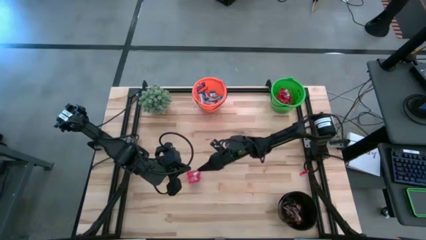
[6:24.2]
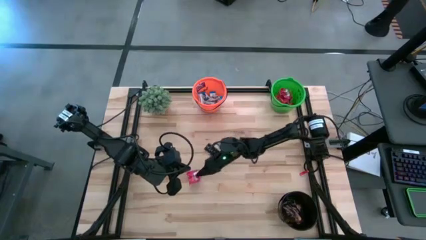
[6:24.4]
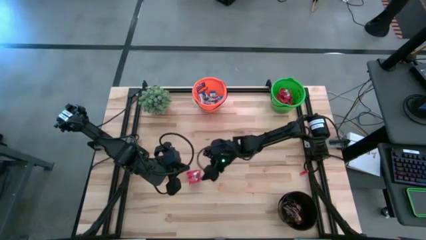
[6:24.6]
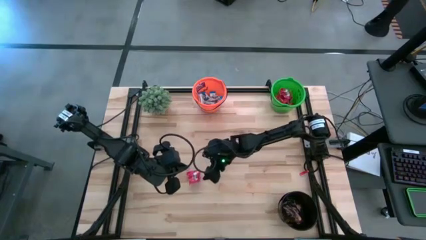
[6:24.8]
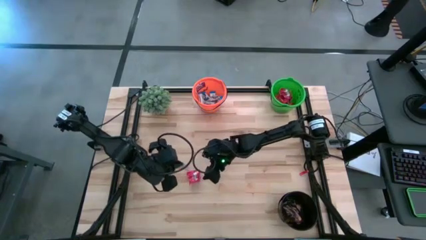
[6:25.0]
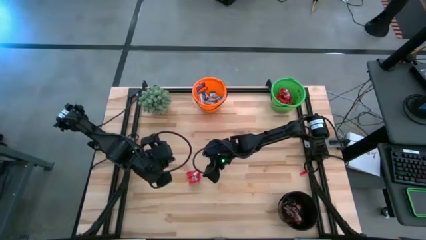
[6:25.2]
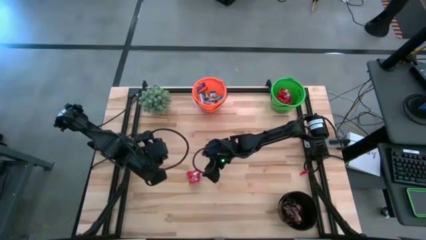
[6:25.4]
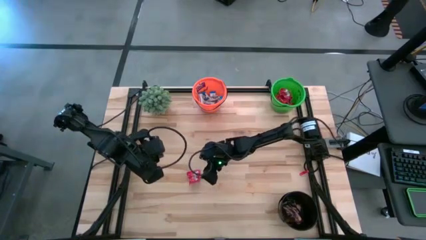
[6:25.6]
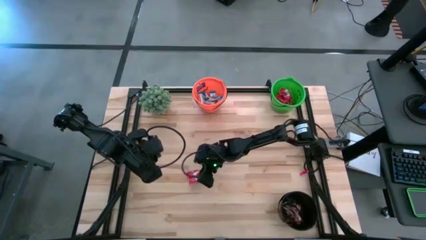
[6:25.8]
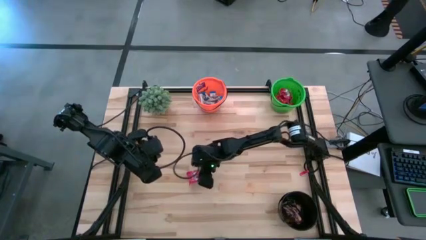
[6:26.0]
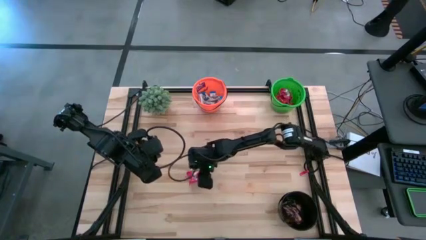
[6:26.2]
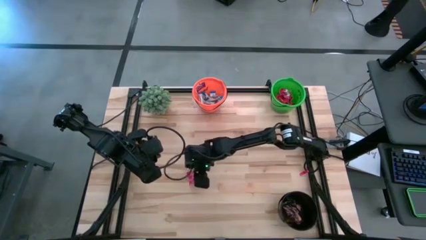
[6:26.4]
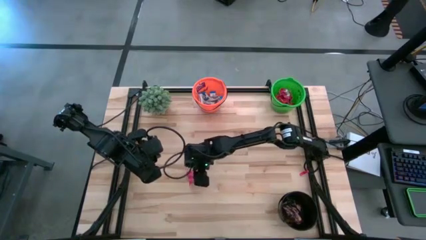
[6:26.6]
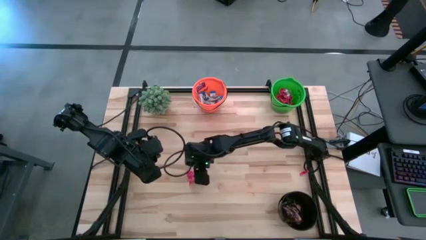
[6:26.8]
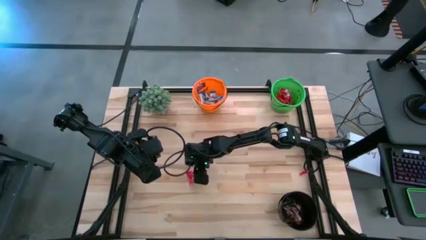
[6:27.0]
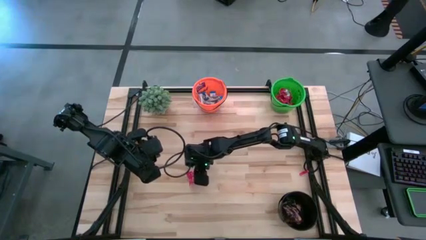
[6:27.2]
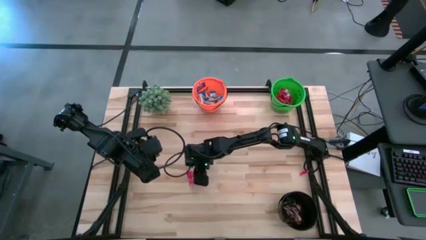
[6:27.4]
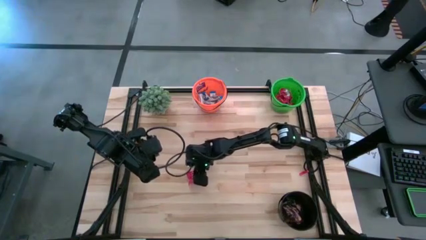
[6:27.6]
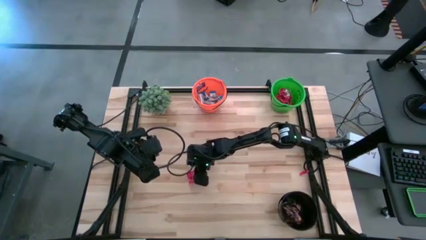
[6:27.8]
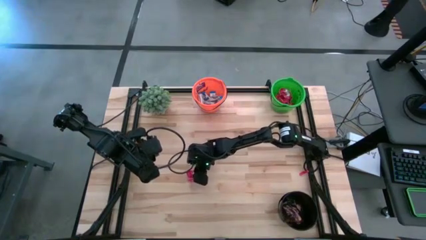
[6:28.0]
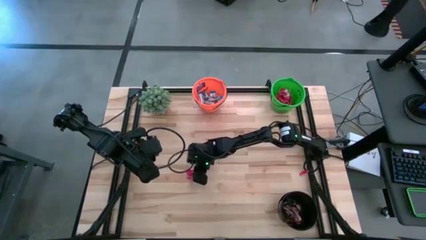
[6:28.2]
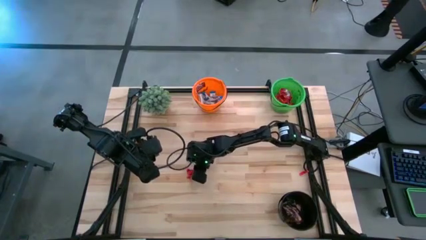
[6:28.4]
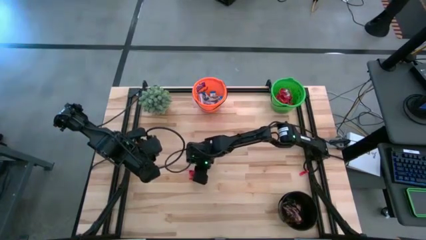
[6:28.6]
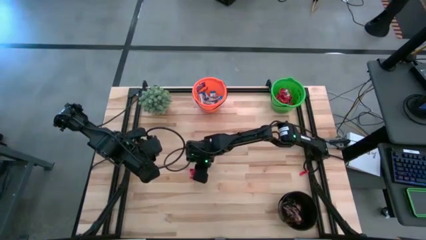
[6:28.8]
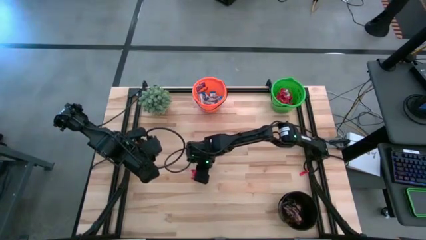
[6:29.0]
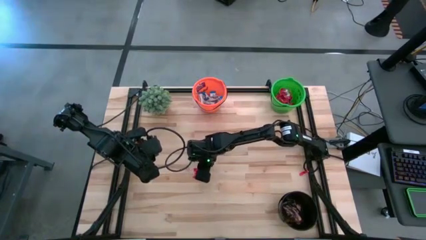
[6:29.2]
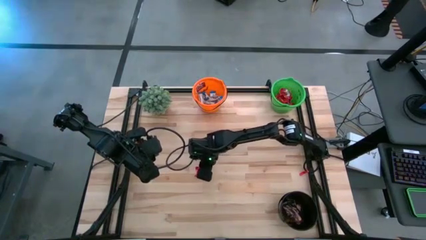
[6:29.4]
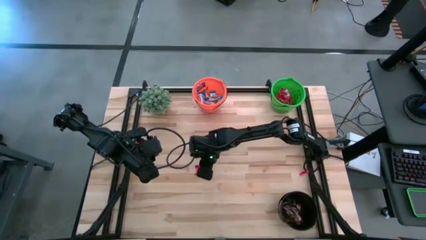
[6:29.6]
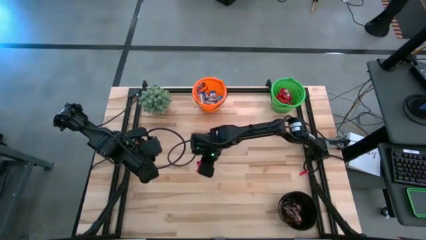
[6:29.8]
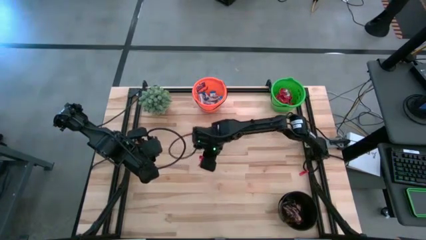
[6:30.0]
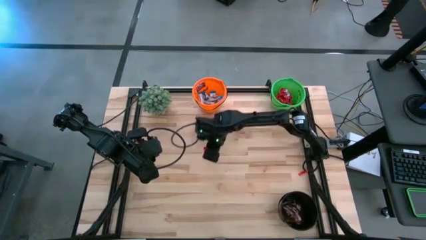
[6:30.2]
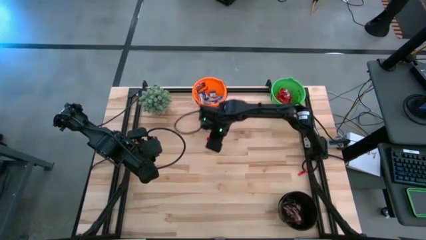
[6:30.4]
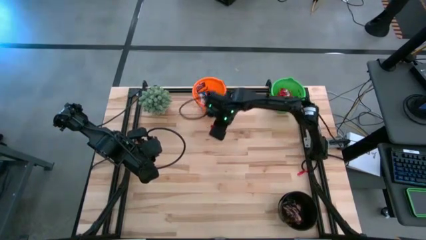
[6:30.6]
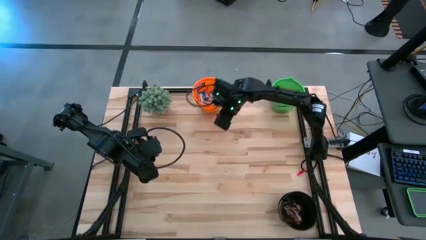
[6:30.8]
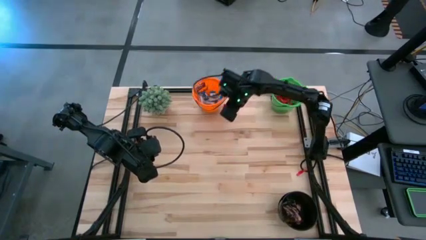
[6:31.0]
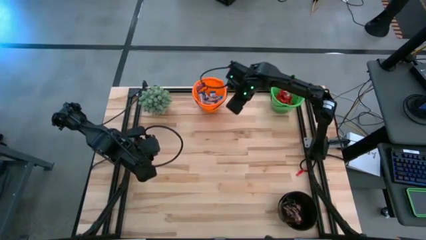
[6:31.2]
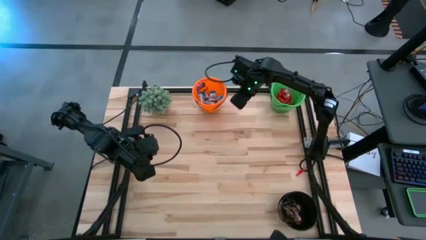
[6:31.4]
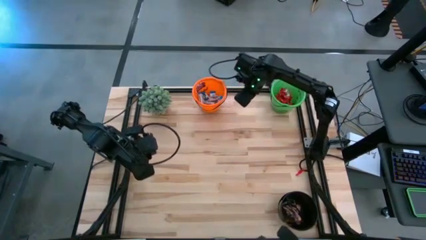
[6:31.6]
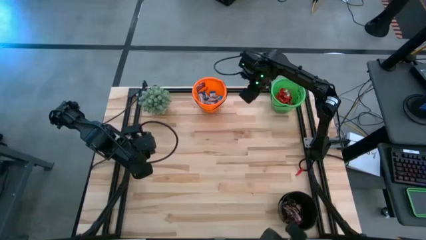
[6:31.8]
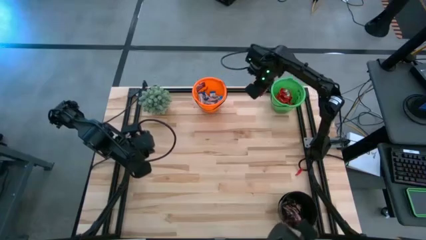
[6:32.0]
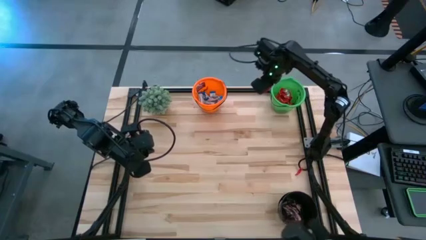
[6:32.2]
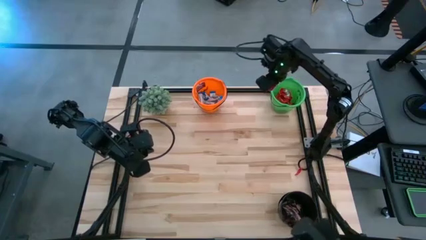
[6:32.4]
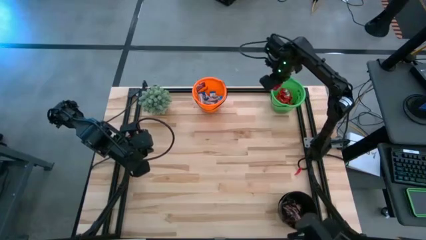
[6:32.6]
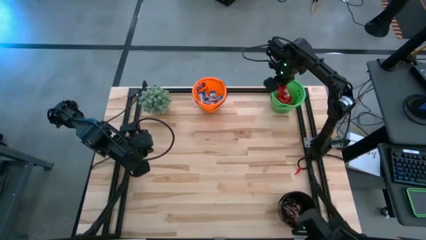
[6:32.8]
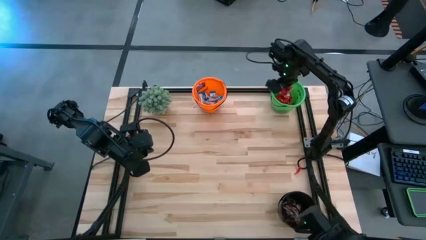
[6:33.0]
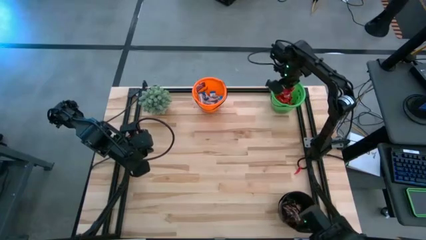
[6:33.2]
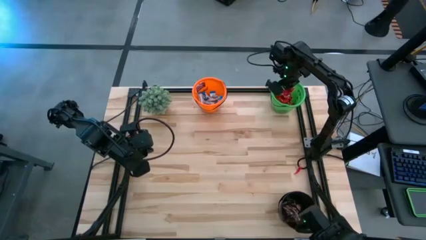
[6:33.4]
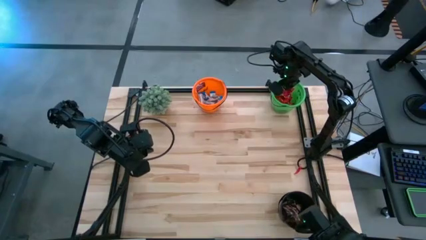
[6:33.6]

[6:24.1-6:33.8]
Task: Organize candy in baskets
Put the red candy into the green bucket
